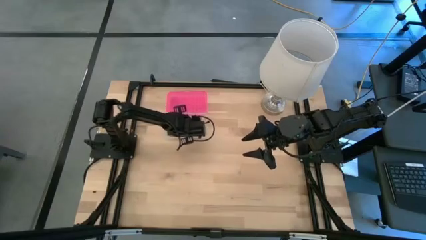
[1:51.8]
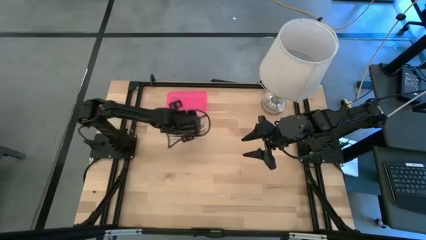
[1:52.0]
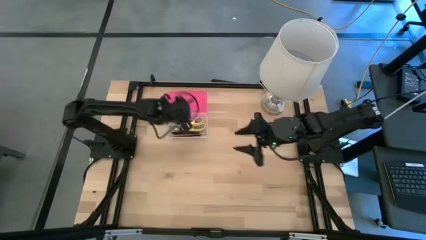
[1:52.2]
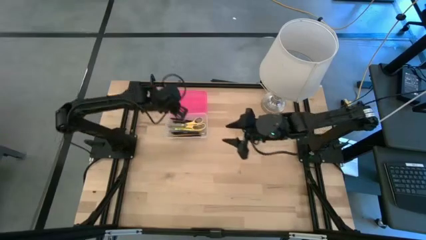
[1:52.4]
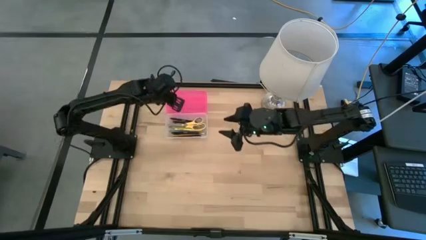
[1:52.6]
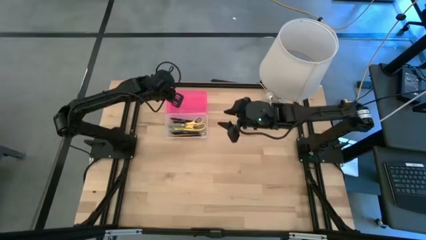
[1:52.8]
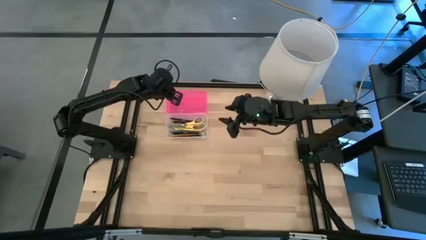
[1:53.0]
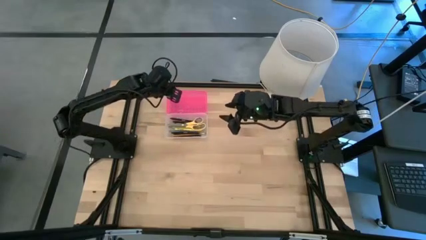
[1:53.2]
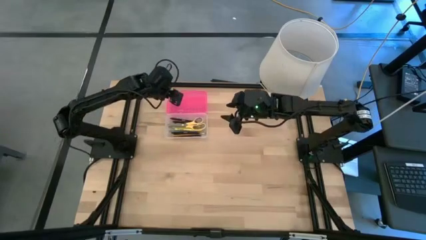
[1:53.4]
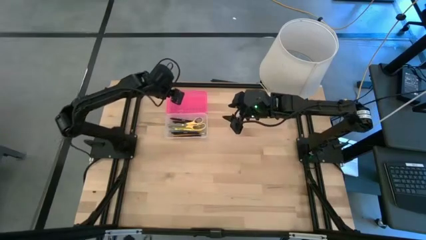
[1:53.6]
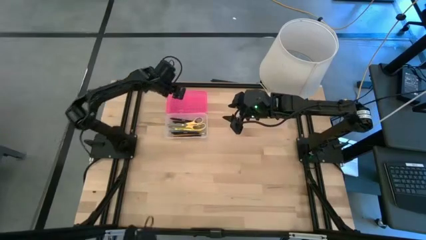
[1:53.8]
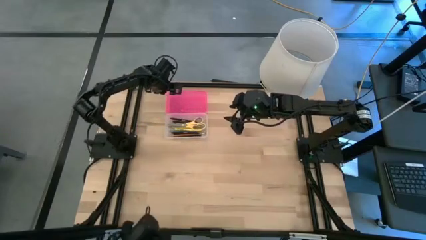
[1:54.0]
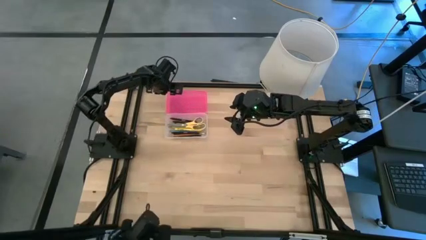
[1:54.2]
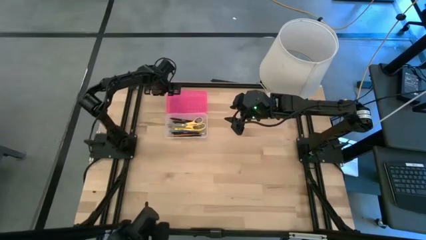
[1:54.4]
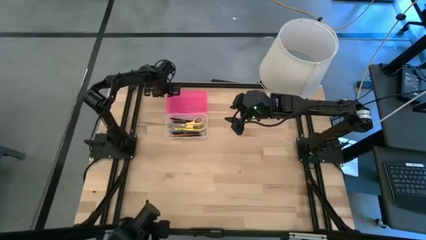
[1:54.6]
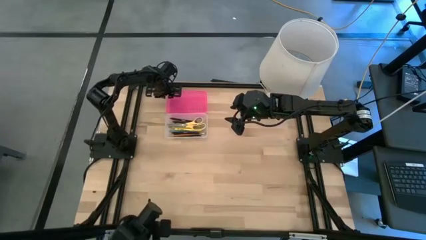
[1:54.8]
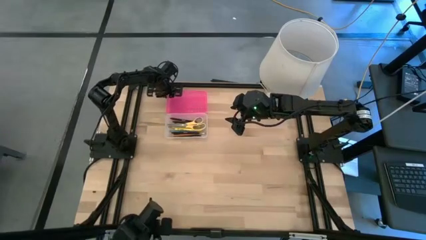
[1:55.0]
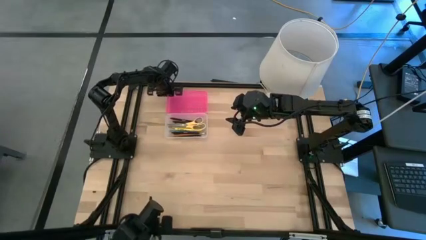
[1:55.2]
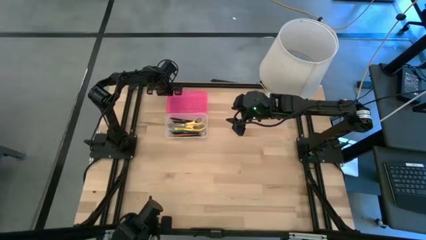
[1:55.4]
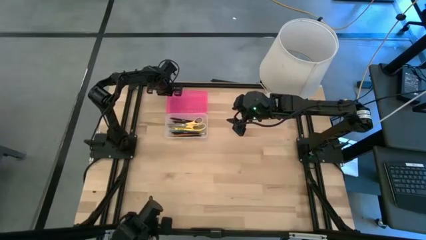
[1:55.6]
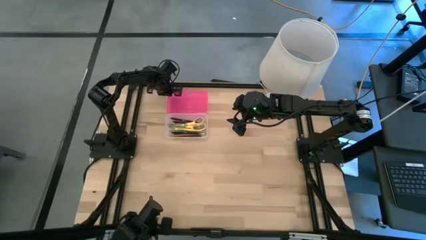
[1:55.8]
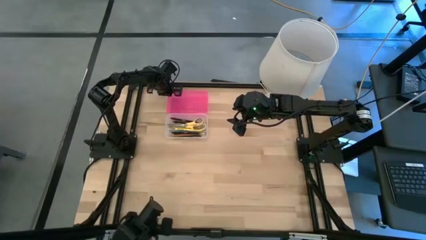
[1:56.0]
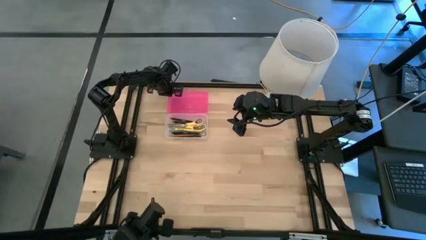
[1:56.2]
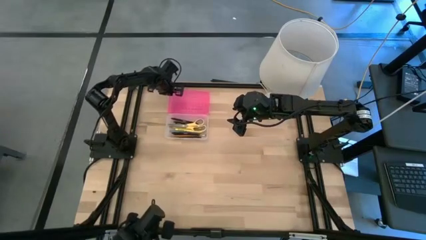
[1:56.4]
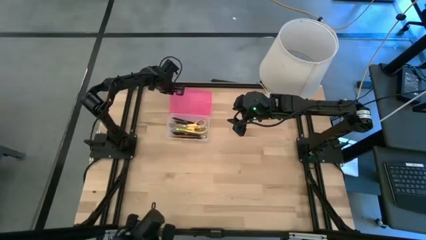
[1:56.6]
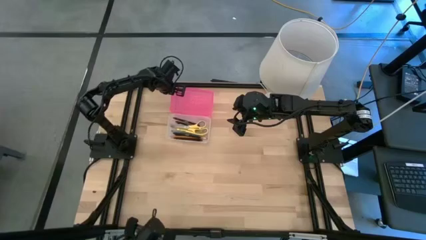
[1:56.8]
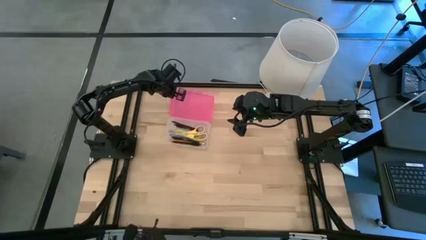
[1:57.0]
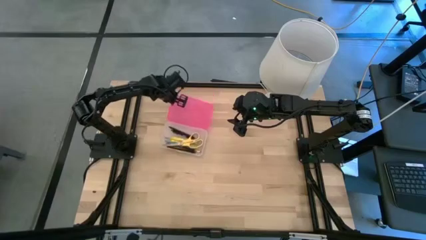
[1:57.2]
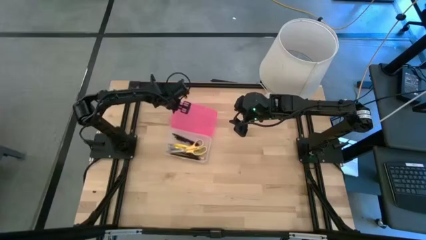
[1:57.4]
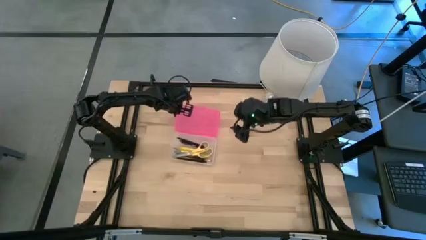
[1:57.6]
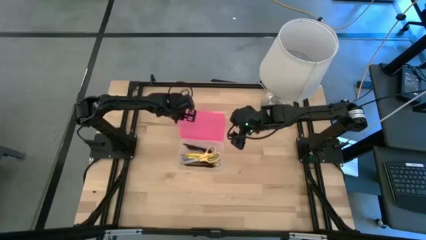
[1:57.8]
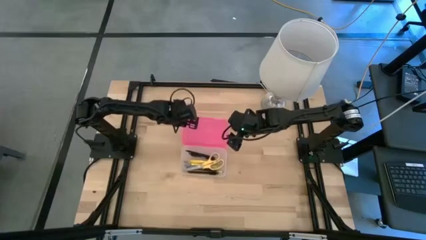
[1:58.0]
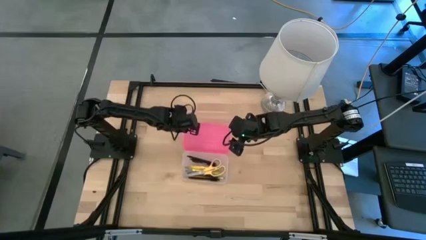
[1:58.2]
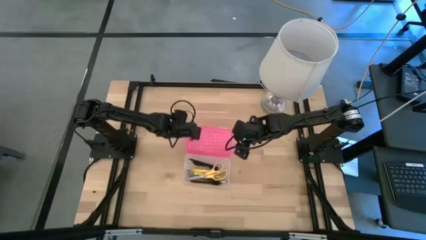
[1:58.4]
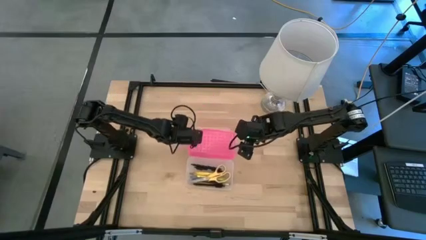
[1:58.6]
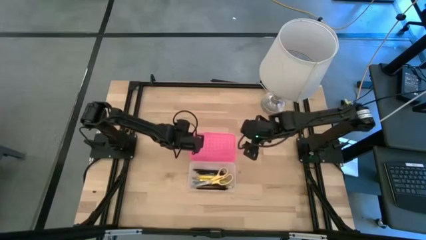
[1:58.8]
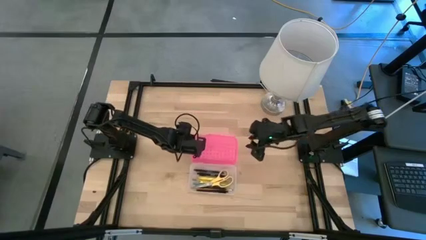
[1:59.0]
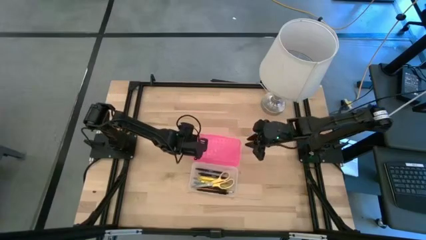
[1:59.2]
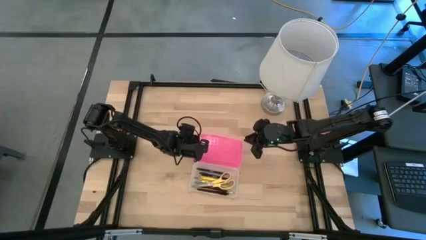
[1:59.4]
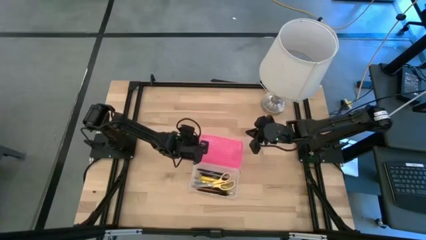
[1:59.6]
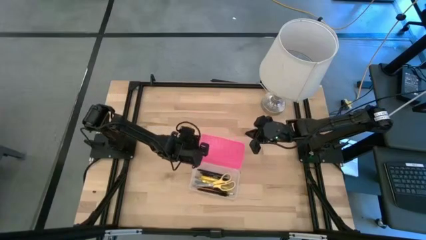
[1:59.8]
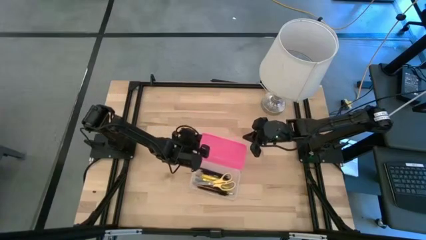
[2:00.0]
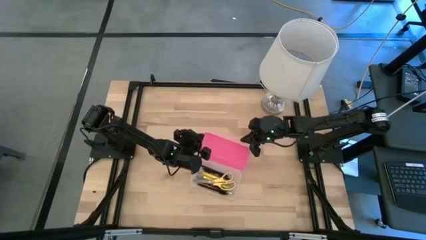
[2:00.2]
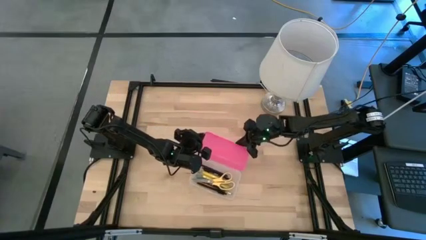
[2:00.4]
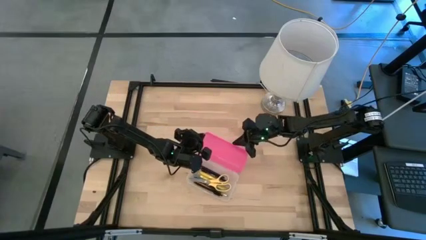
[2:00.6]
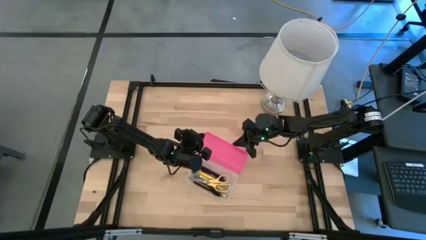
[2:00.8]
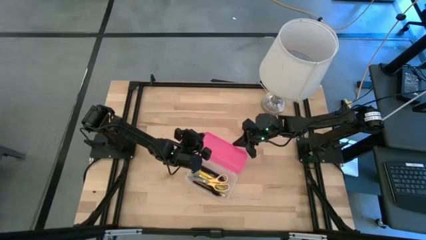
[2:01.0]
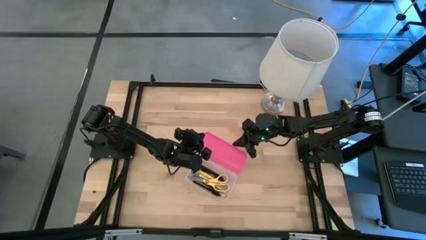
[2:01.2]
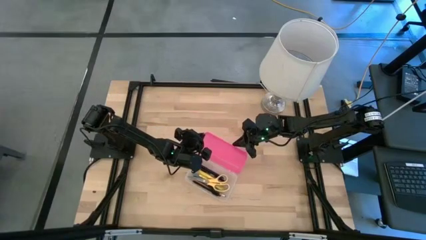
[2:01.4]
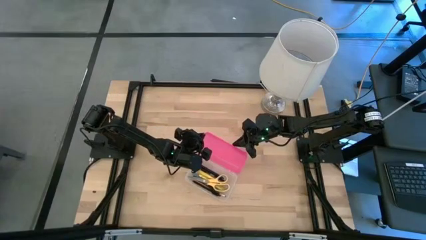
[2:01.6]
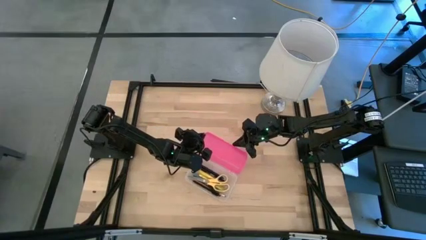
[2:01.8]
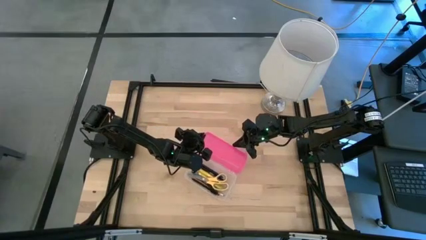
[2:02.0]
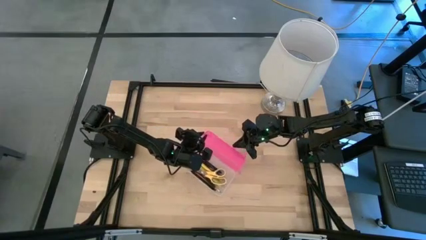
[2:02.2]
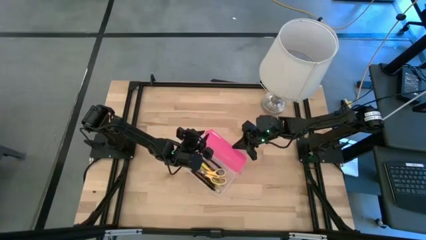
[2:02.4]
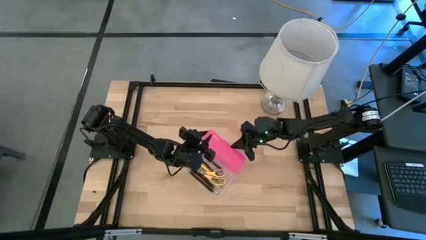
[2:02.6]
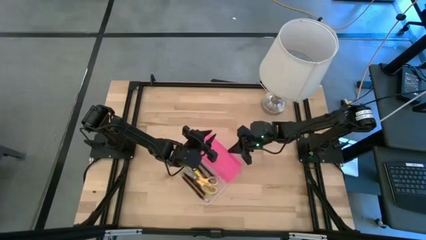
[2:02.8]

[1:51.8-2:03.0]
Task: Pick & place school supplies into a supply box
Close the pink supply box

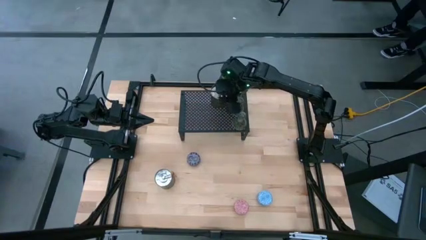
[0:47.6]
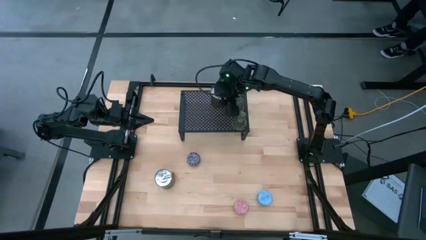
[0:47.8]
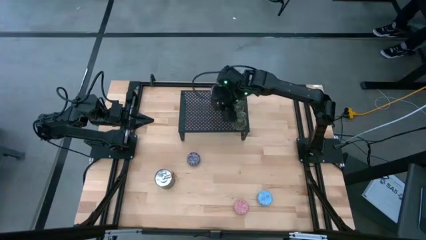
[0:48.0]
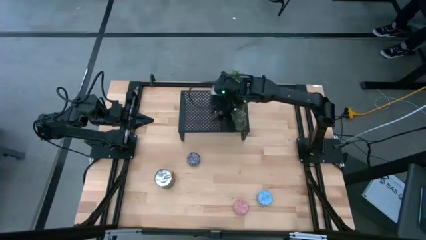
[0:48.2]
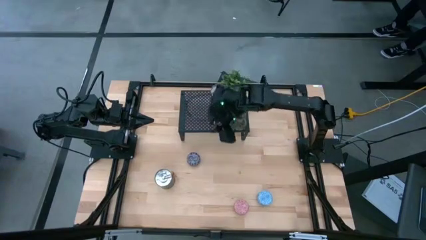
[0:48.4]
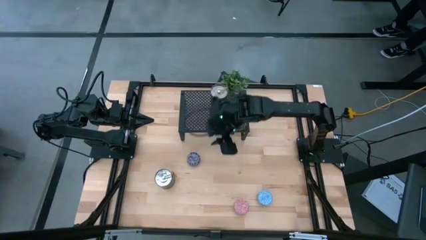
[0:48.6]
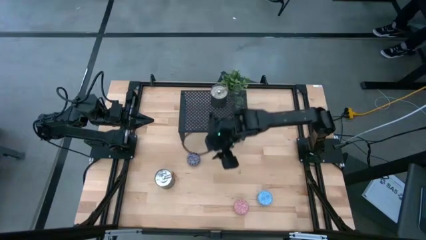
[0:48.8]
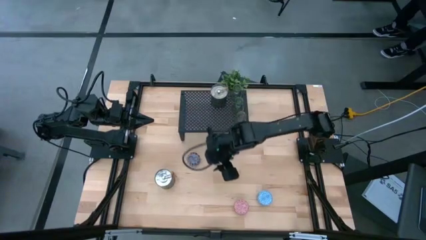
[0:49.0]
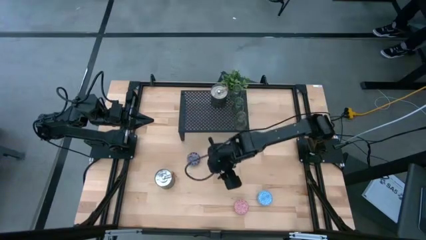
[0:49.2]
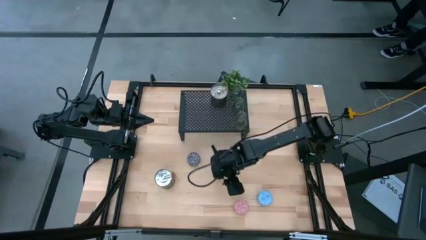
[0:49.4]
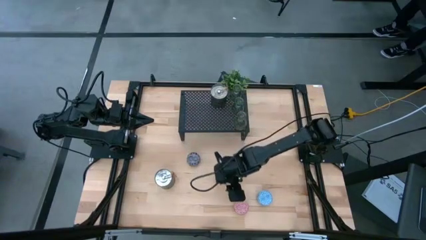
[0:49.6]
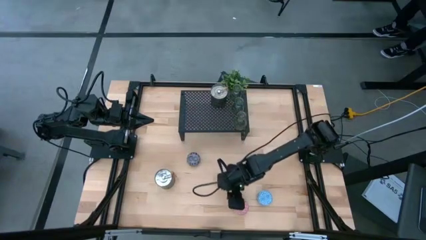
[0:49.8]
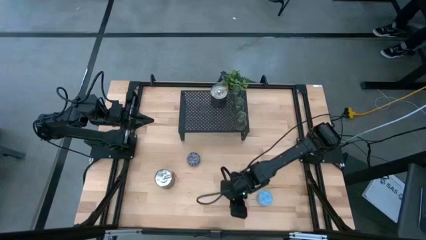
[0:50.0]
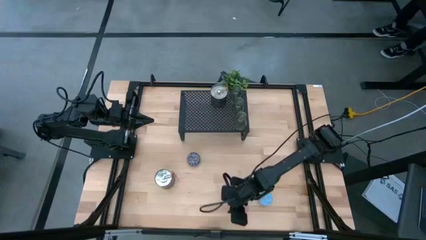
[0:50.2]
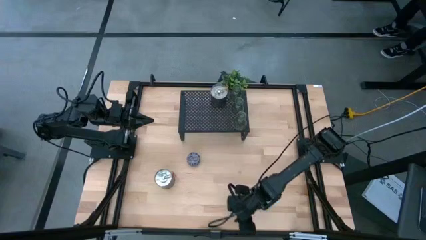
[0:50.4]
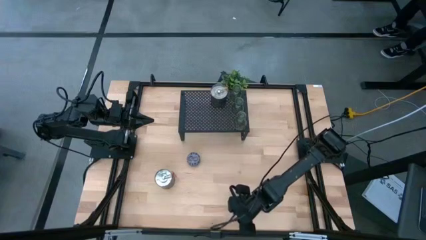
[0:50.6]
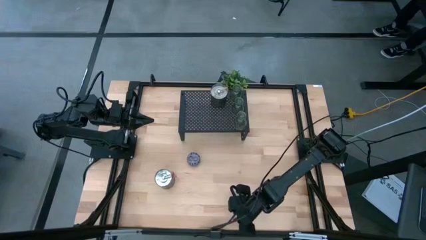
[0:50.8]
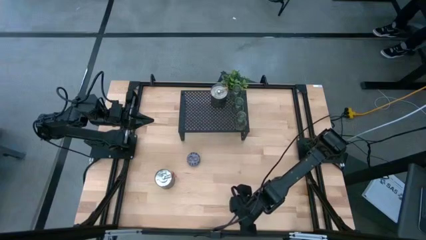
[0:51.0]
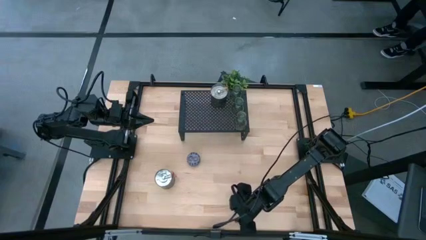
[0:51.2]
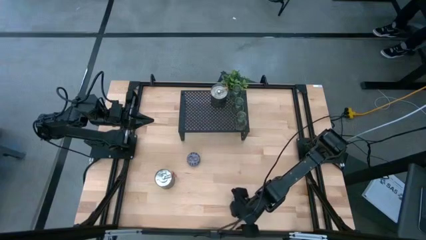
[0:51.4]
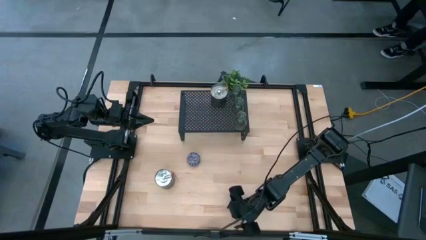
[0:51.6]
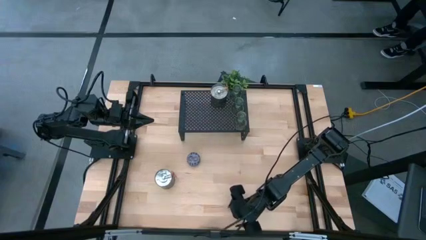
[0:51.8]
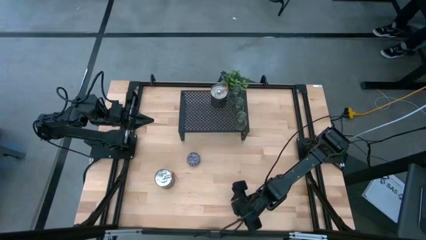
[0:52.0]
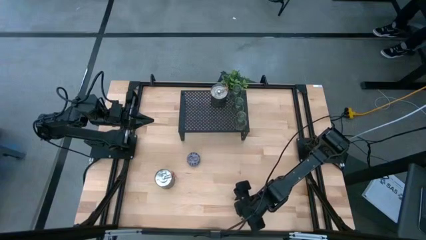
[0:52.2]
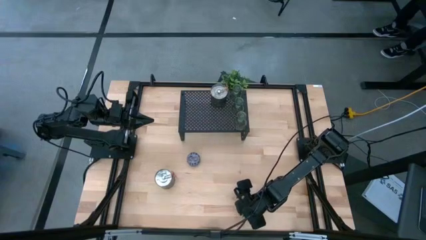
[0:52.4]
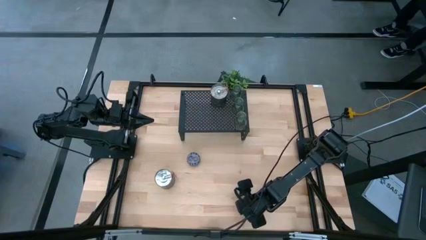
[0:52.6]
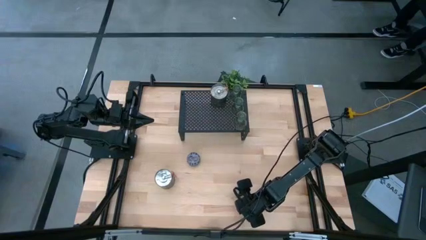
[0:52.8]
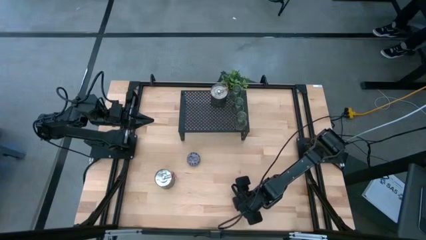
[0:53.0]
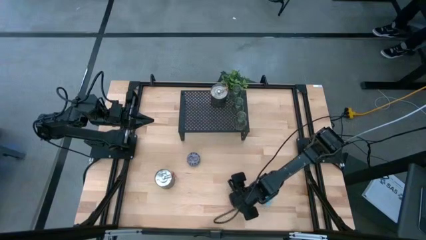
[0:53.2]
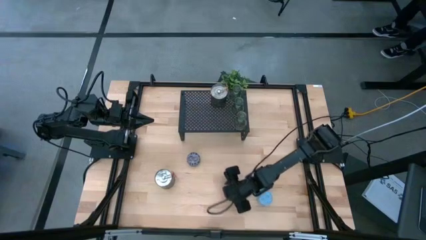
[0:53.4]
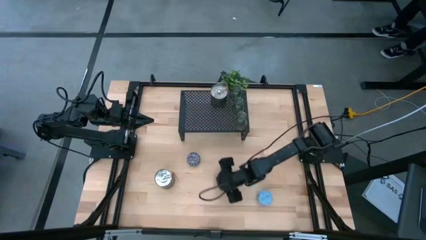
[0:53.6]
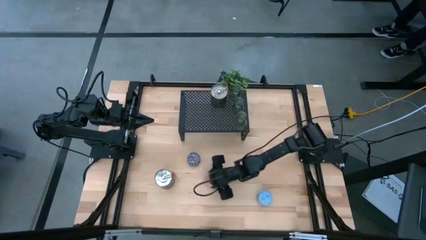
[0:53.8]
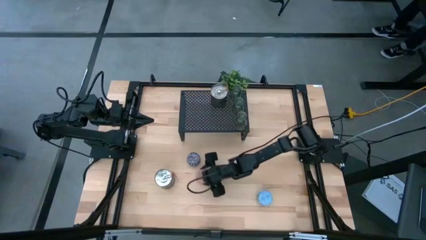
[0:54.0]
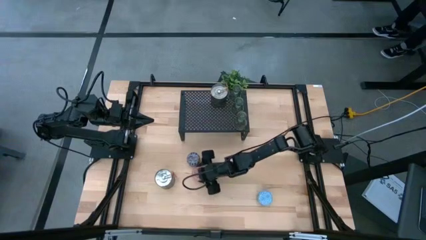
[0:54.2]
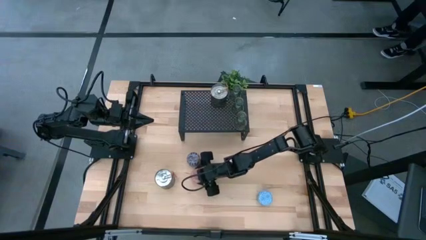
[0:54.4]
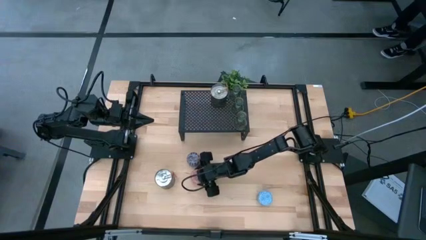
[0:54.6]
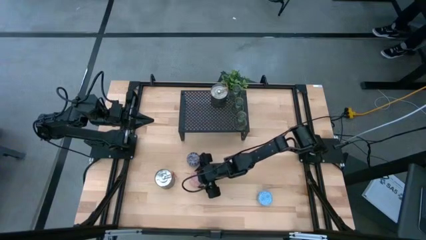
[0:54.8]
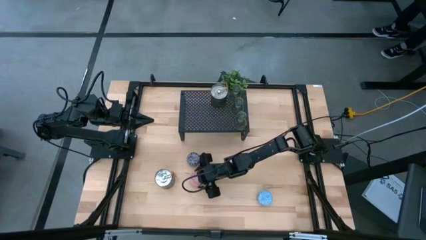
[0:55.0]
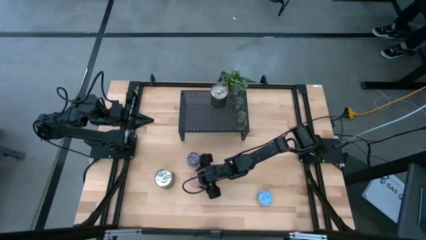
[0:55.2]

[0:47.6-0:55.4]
Task: Pick & Place candle stick holders
Move the red patterned scented candle to the center of the table
